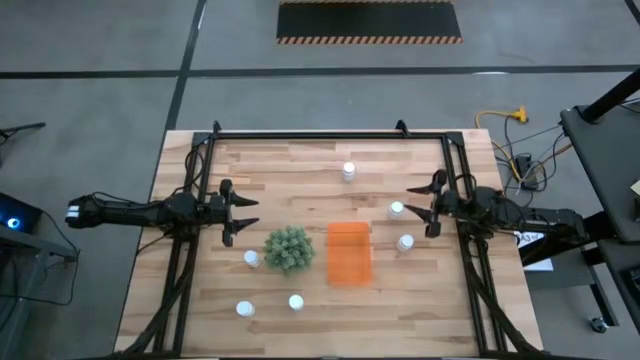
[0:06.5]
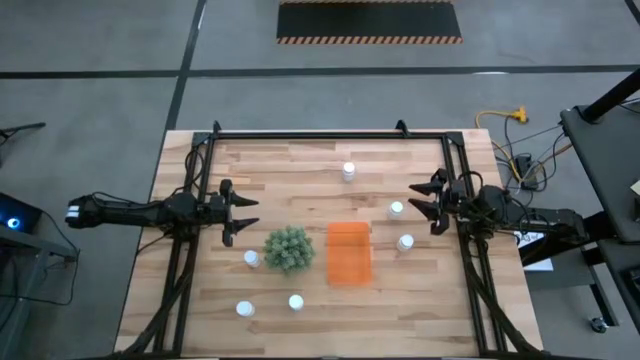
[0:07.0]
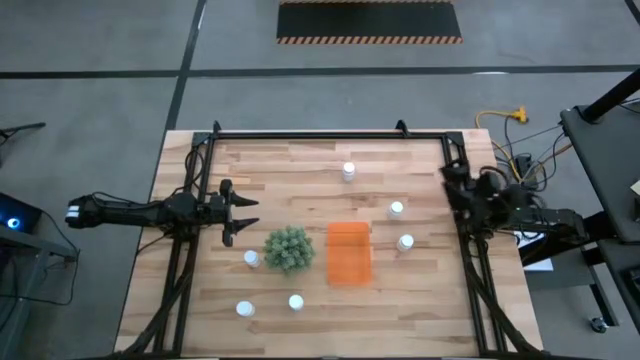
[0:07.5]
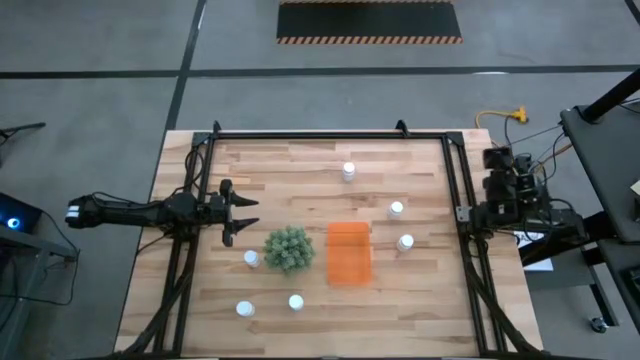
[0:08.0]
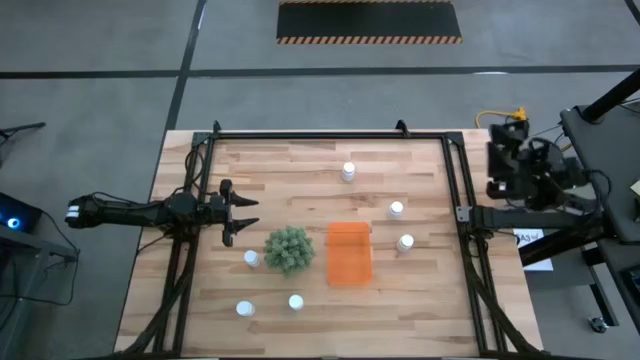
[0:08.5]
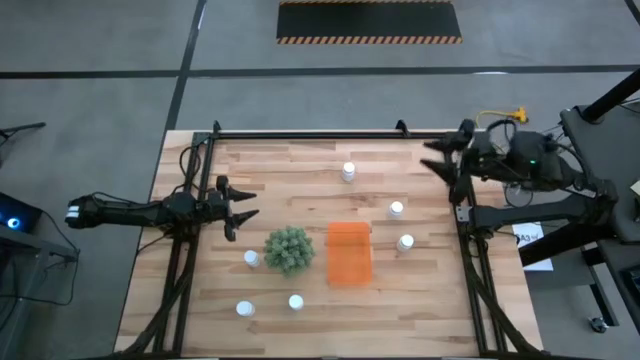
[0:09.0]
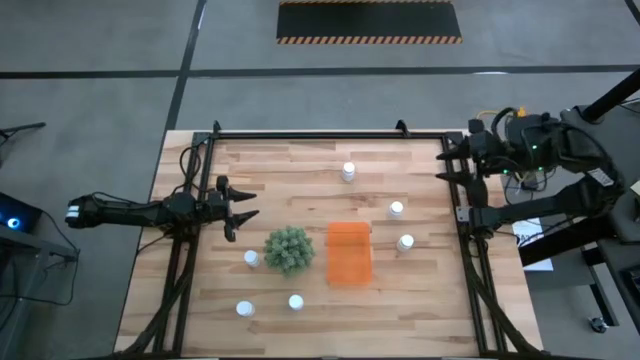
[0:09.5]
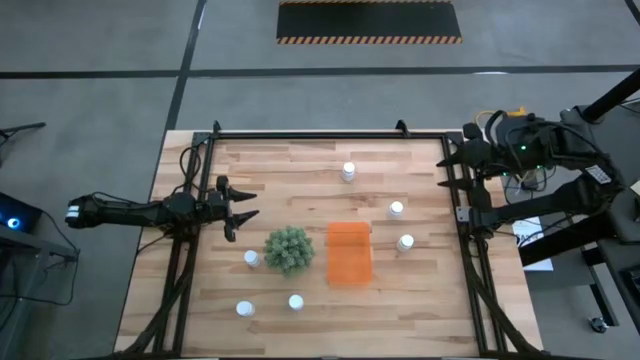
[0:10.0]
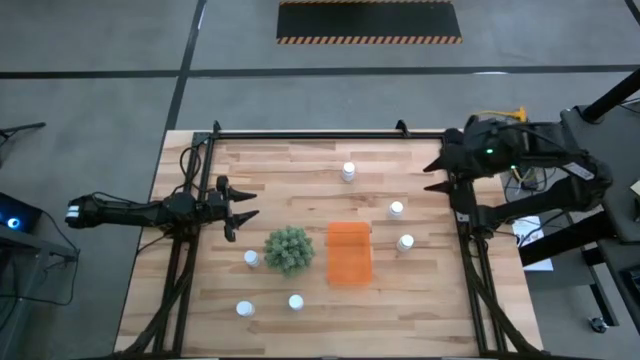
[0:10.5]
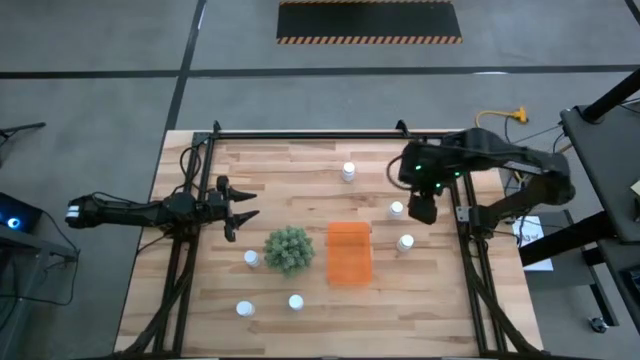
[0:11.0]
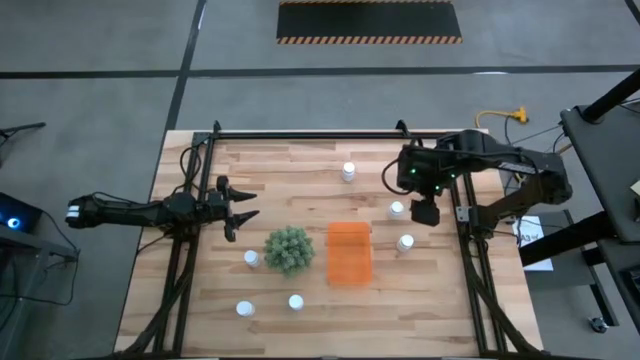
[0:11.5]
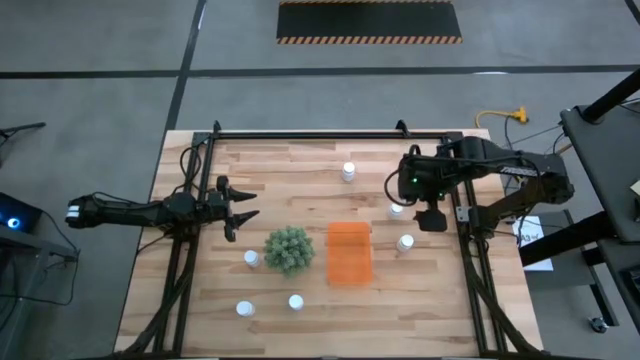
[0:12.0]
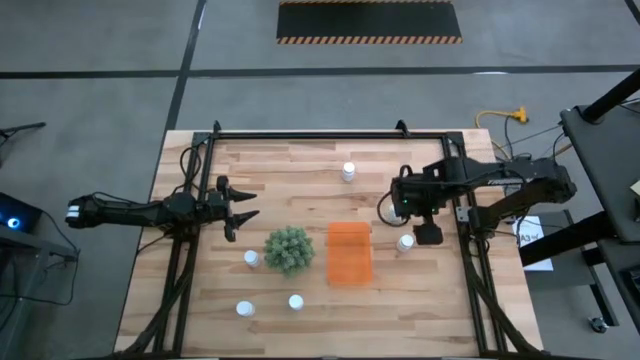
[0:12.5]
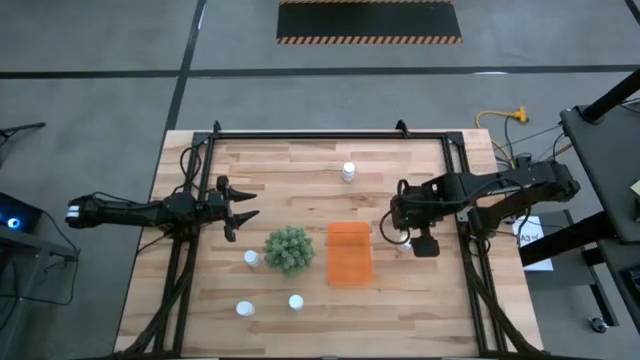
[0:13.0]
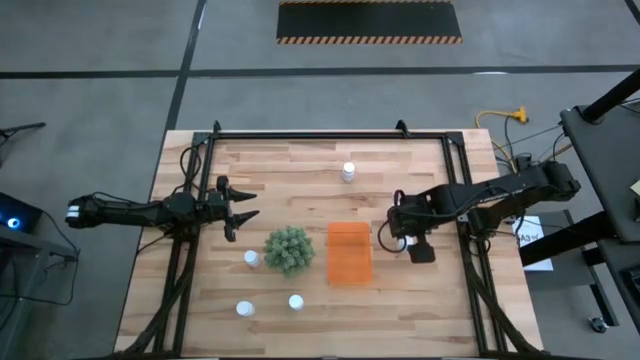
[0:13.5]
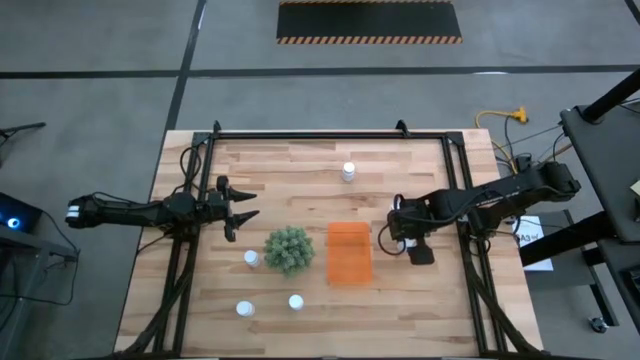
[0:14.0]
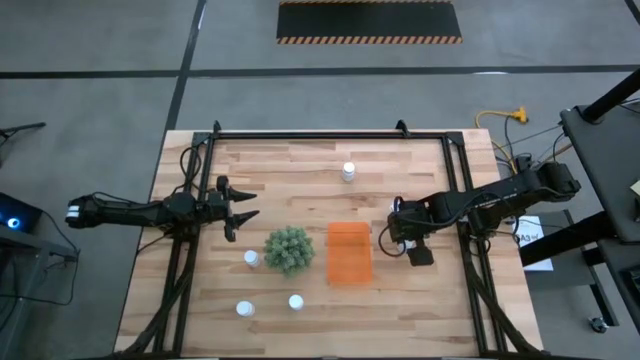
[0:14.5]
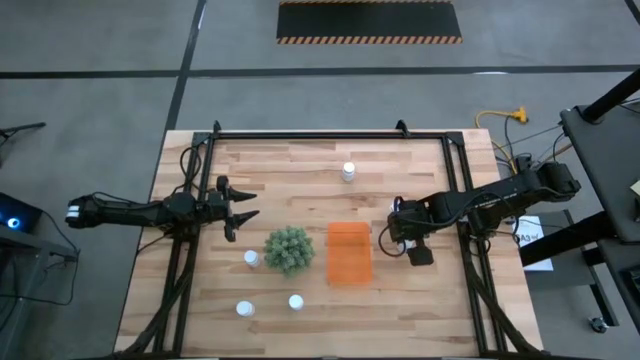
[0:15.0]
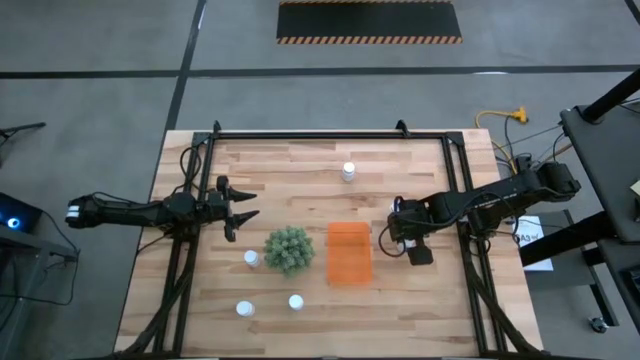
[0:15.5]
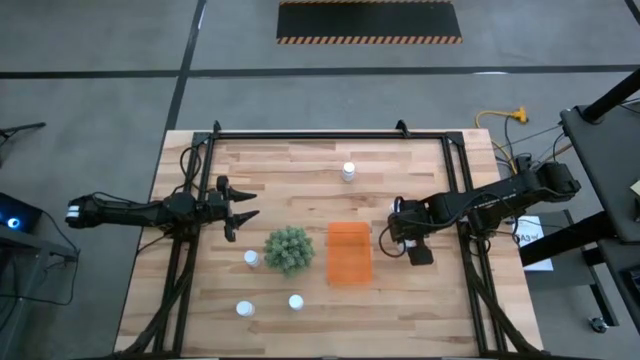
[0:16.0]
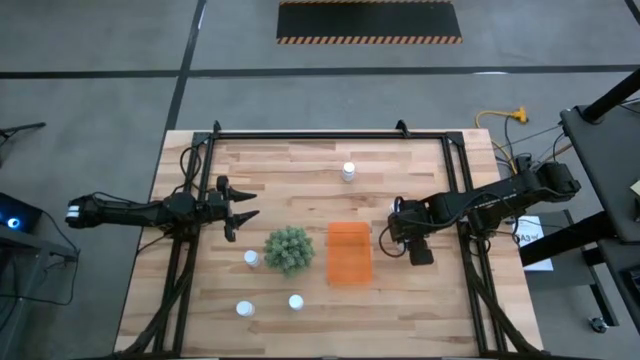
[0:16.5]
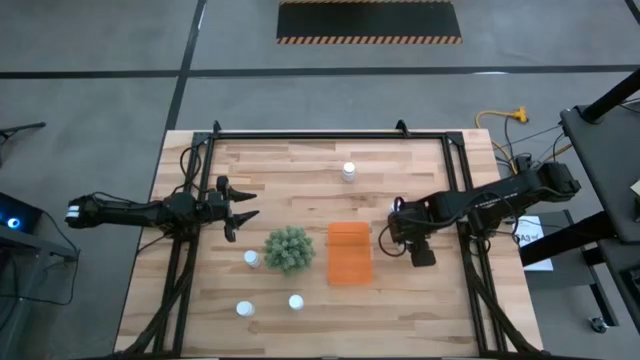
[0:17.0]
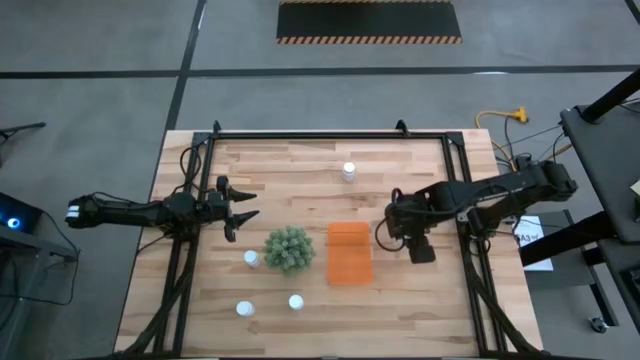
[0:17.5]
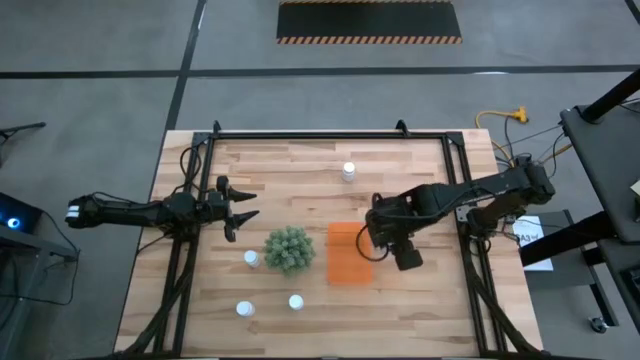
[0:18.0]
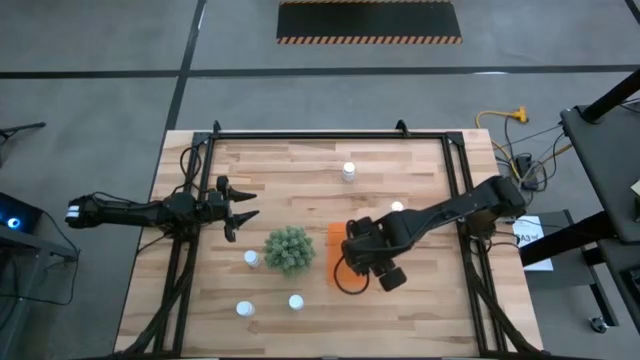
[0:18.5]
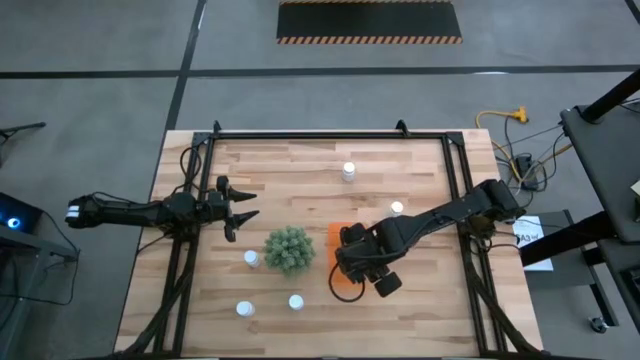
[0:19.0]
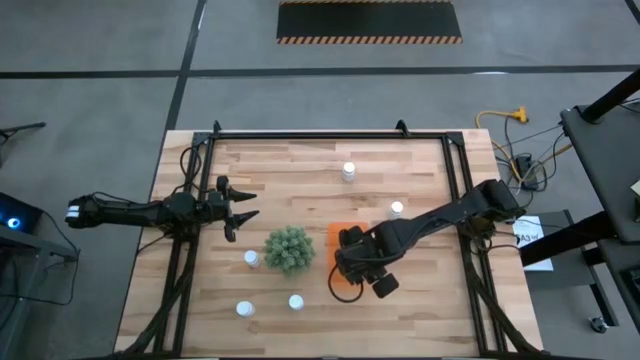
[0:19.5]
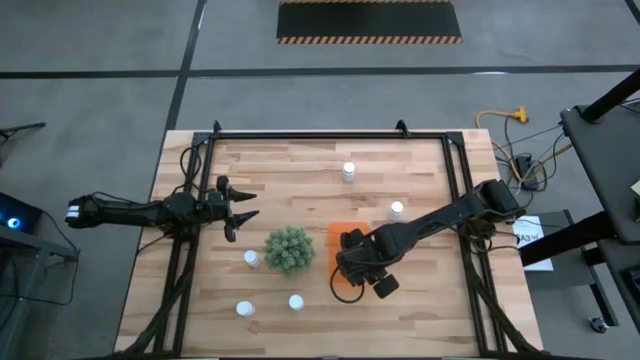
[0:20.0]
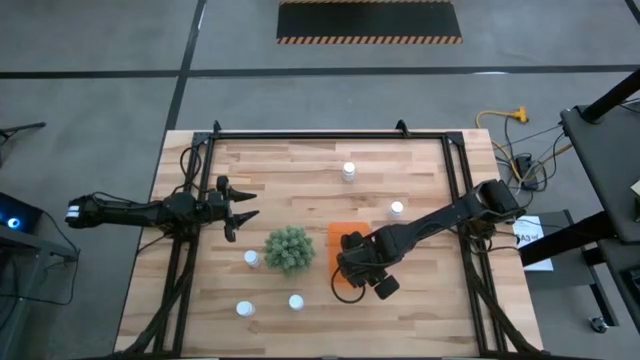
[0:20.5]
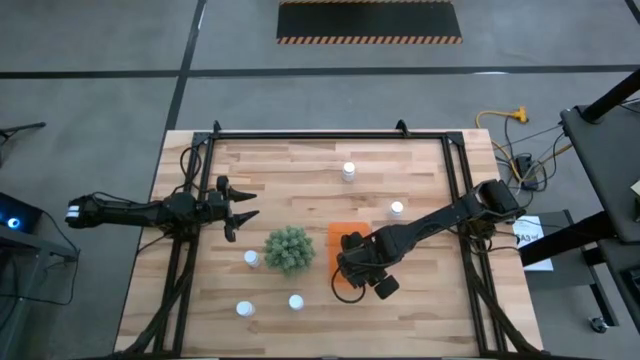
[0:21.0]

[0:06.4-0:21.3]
Task: Pick and place pill bottles into a basket
Put the white medicine bottle into the orange bin

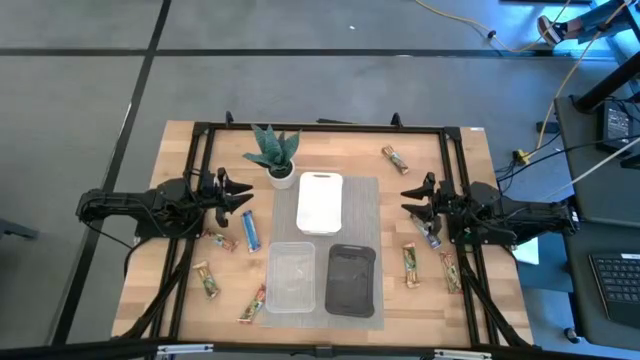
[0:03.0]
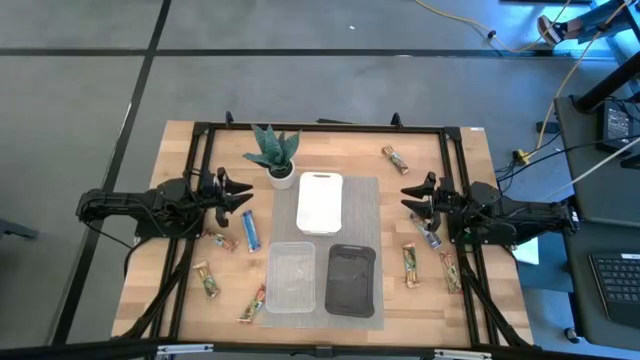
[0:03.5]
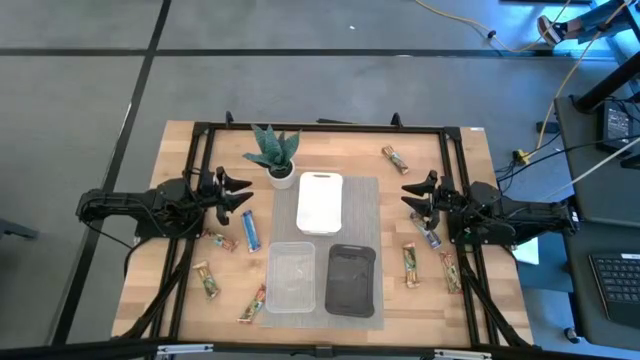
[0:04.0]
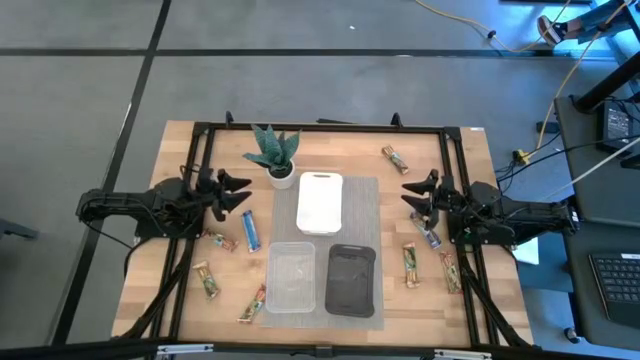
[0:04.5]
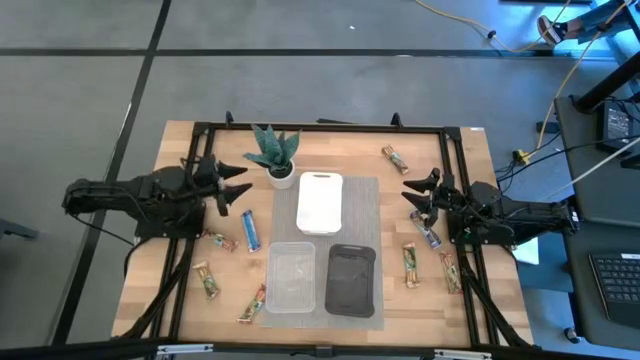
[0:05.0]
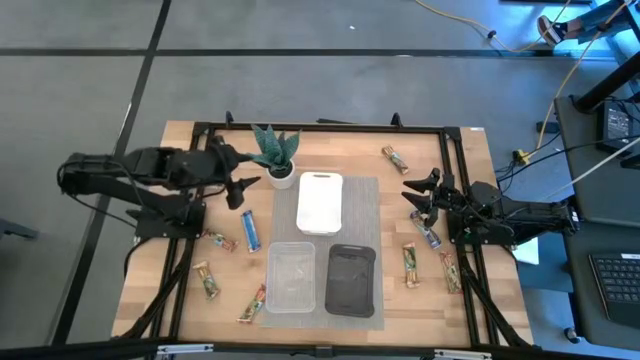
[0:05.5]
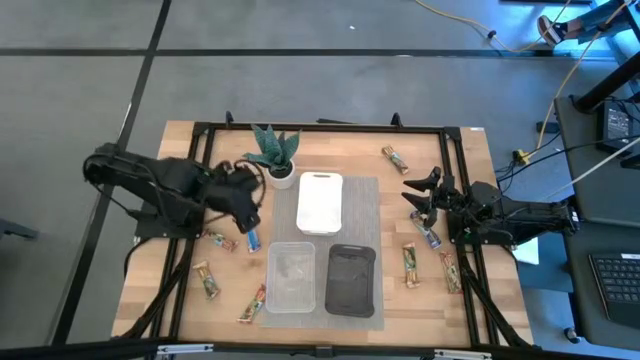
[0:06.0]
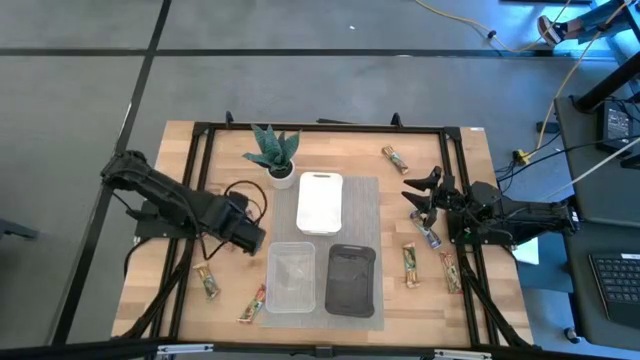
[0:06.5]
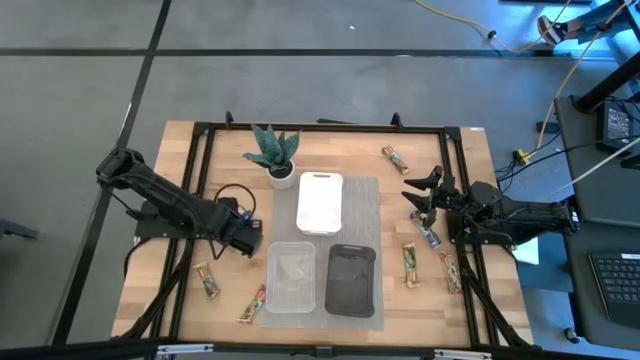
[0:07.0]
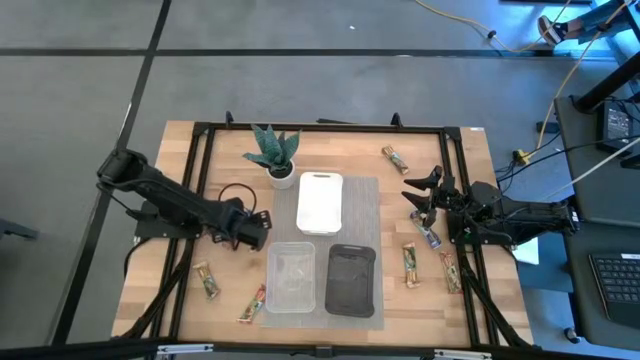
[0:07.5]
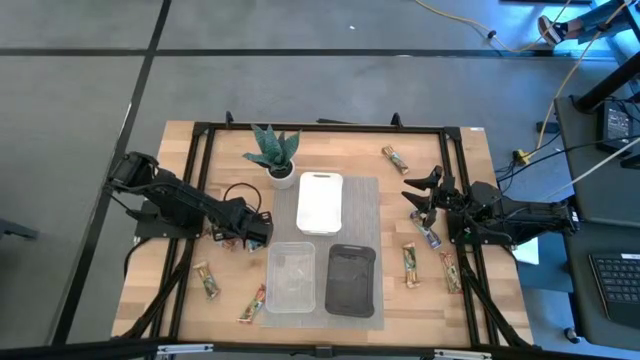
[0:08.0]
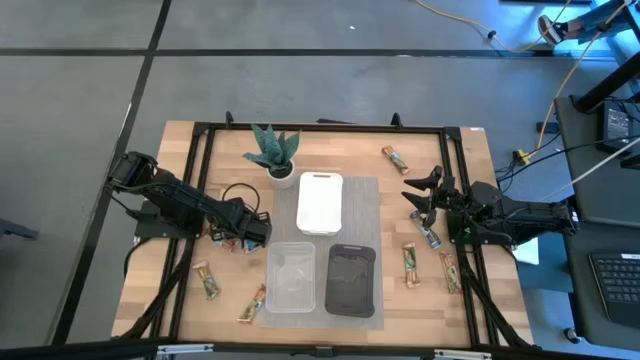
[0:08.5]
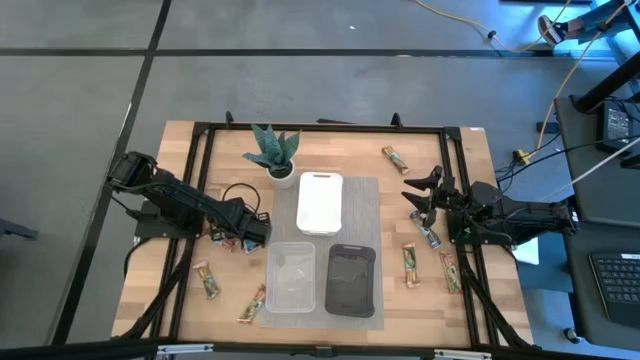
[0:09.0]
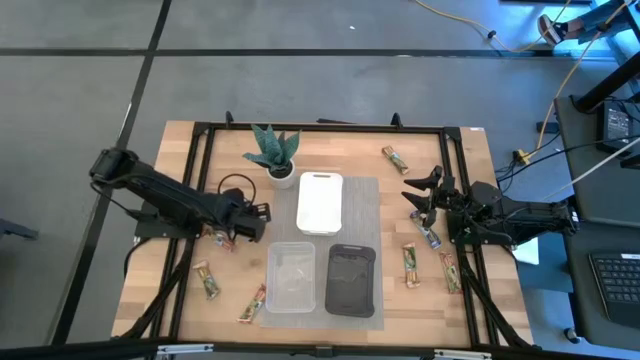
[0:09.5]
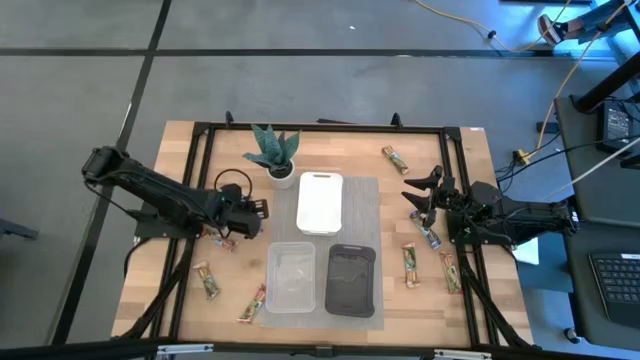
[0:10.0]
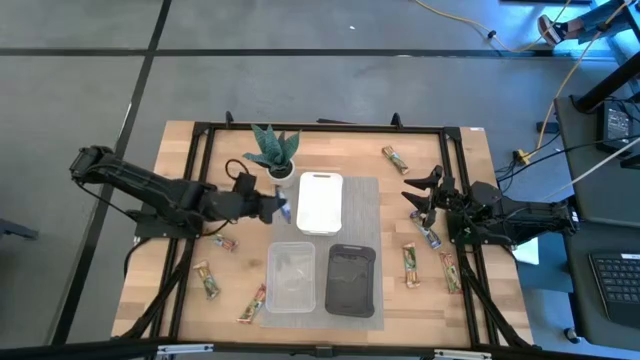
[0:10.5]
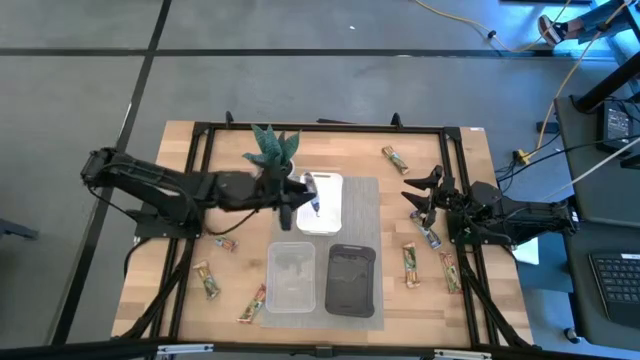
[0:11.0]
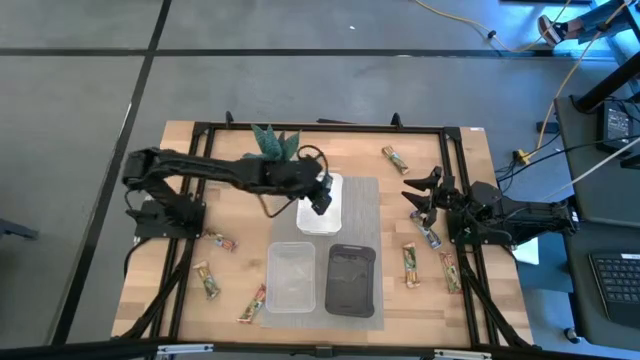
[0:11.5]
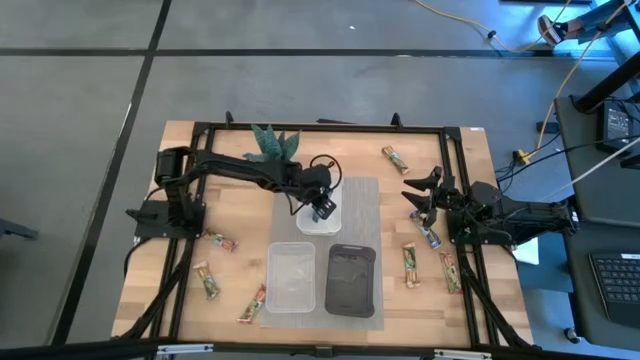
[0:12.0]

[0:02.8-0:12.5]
Task: Pick and place Granola Bars by type
Put the left blue granola bar into the white bin
